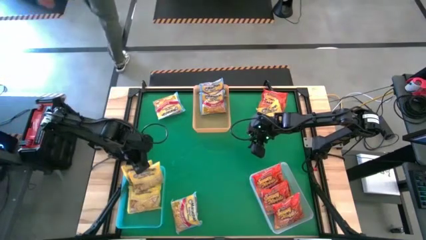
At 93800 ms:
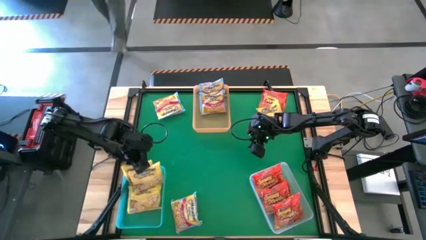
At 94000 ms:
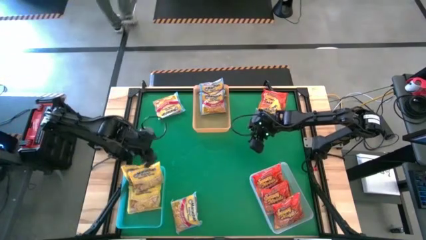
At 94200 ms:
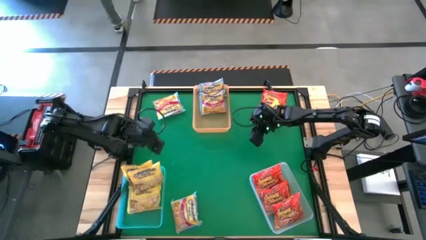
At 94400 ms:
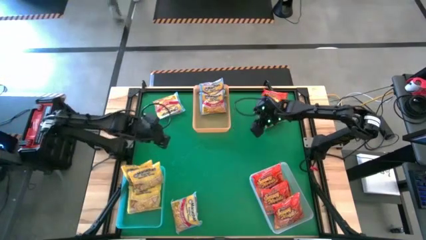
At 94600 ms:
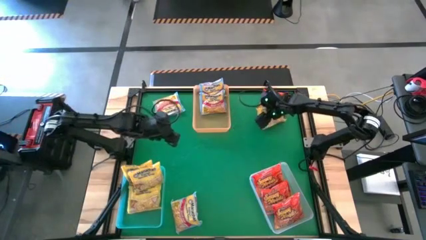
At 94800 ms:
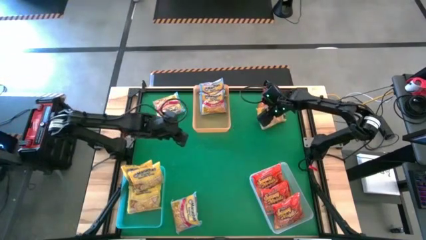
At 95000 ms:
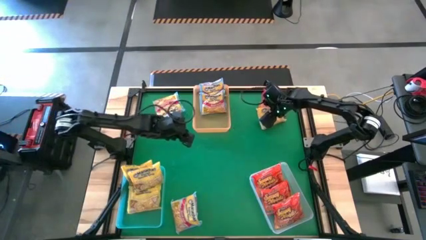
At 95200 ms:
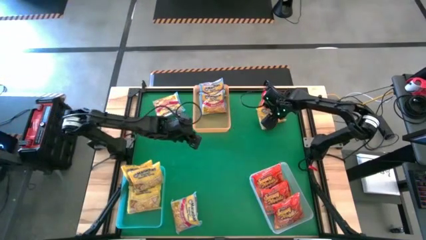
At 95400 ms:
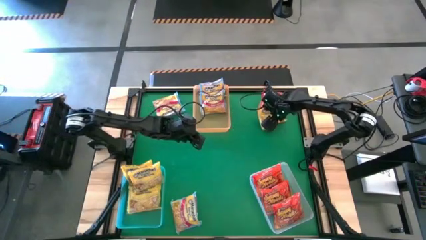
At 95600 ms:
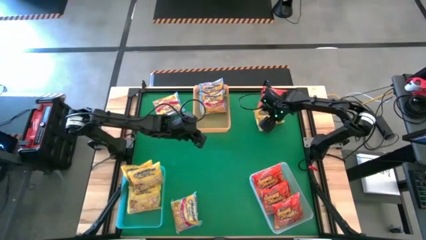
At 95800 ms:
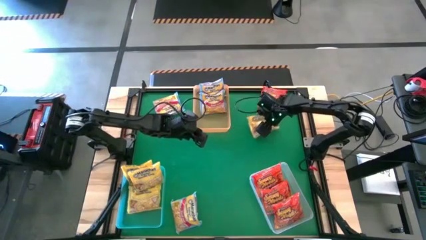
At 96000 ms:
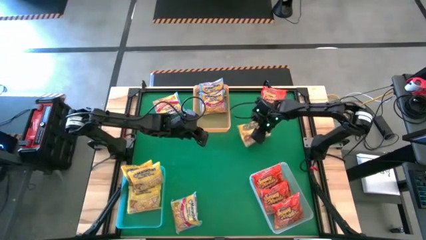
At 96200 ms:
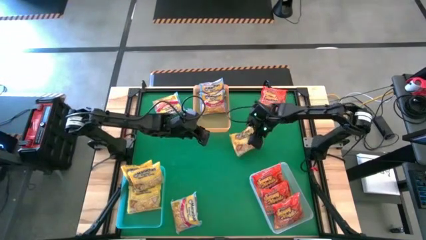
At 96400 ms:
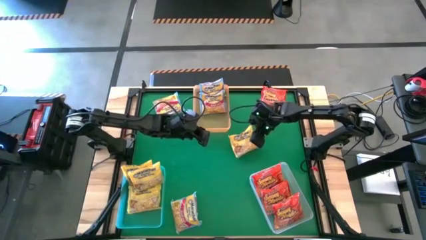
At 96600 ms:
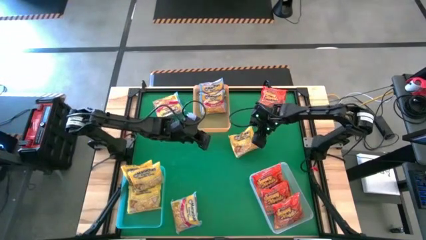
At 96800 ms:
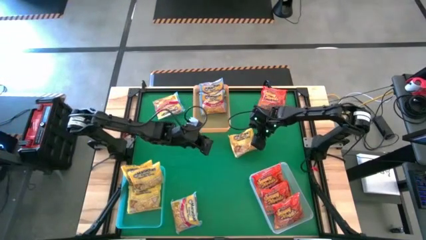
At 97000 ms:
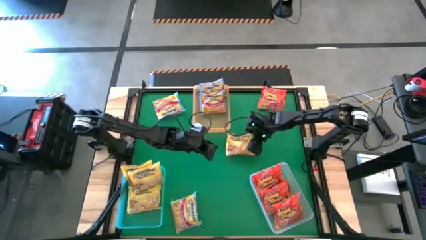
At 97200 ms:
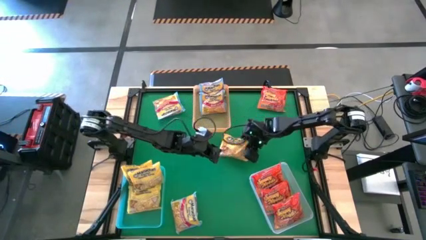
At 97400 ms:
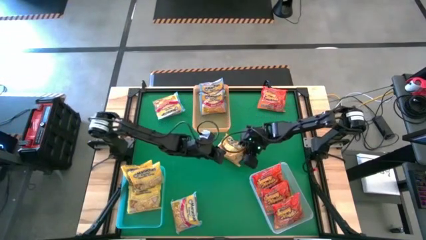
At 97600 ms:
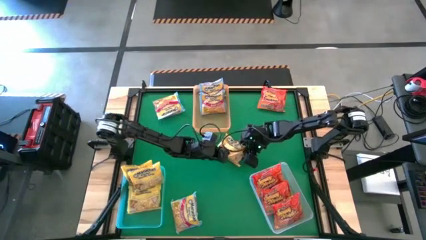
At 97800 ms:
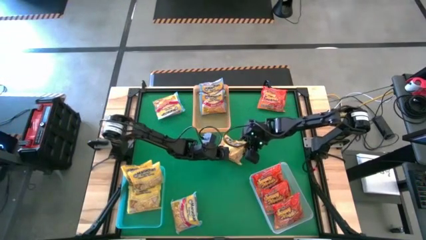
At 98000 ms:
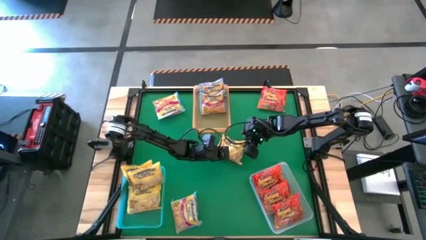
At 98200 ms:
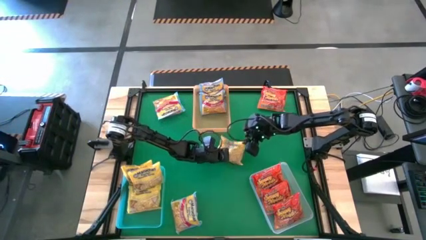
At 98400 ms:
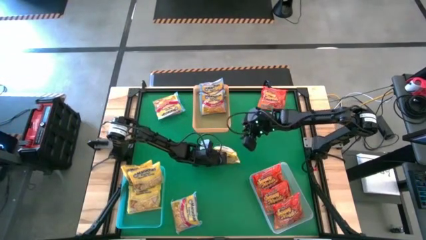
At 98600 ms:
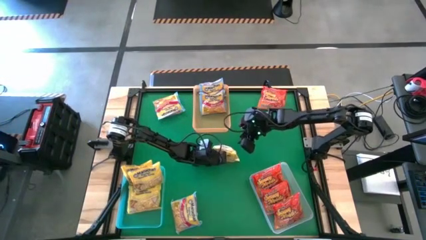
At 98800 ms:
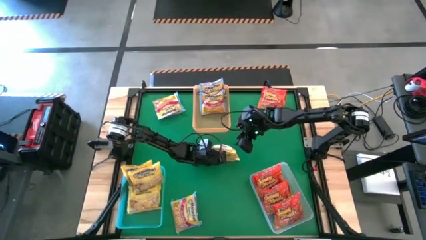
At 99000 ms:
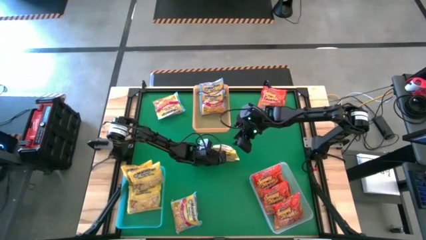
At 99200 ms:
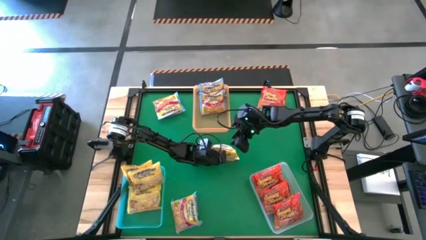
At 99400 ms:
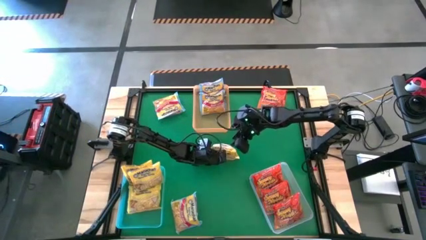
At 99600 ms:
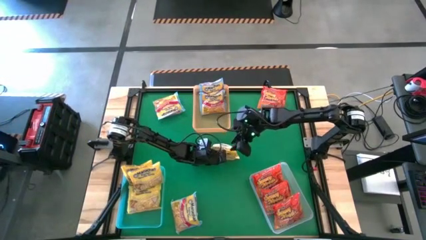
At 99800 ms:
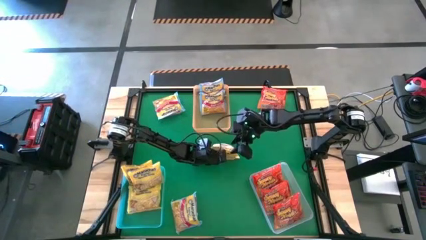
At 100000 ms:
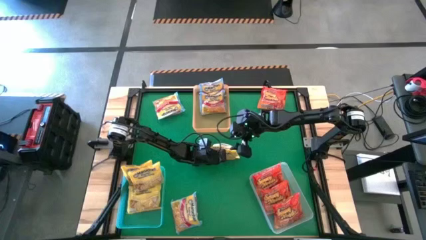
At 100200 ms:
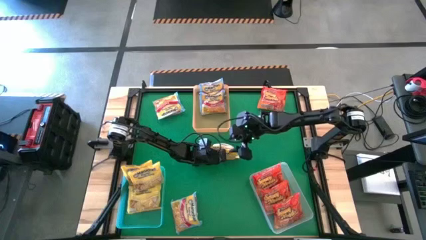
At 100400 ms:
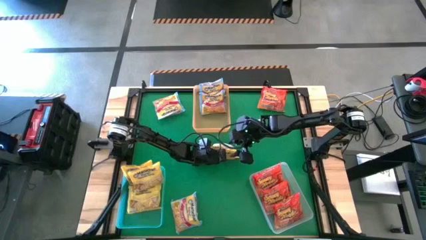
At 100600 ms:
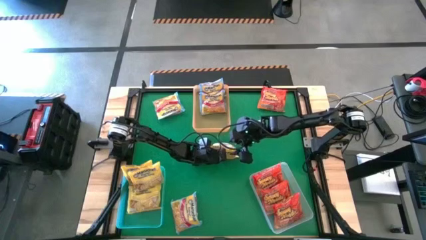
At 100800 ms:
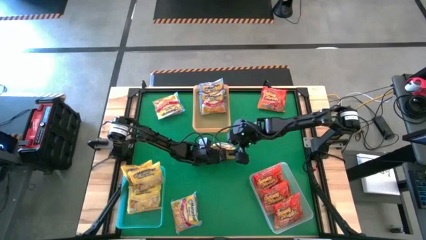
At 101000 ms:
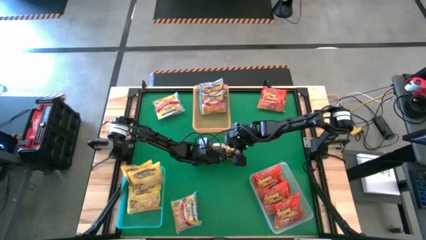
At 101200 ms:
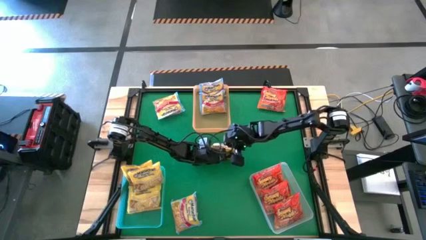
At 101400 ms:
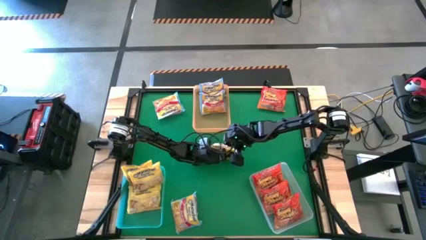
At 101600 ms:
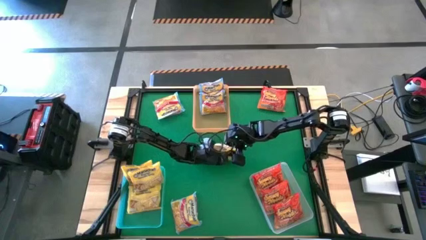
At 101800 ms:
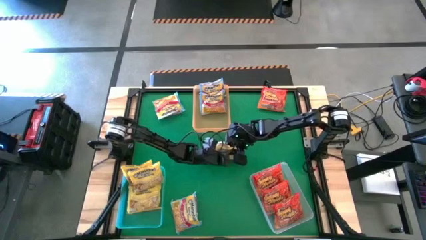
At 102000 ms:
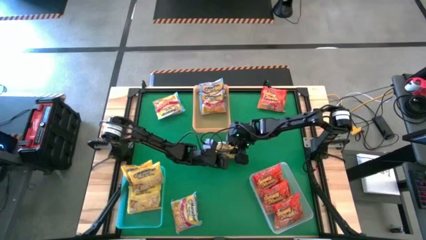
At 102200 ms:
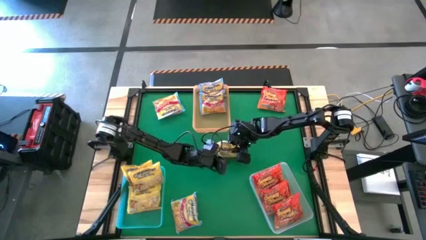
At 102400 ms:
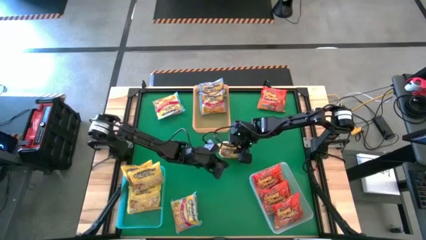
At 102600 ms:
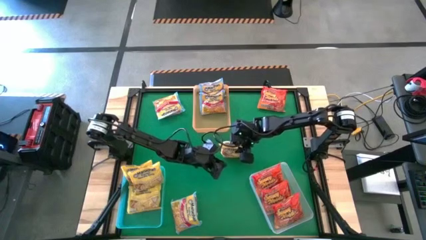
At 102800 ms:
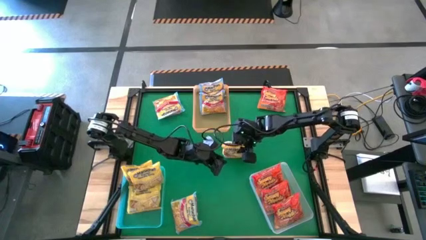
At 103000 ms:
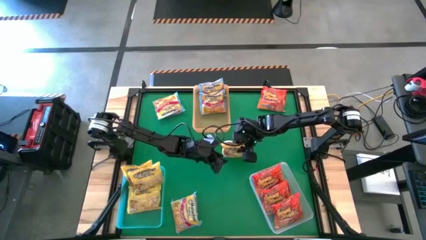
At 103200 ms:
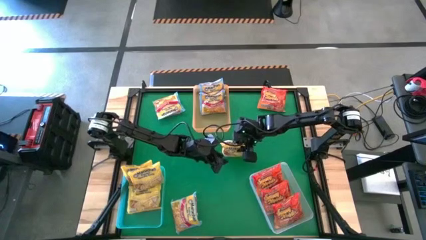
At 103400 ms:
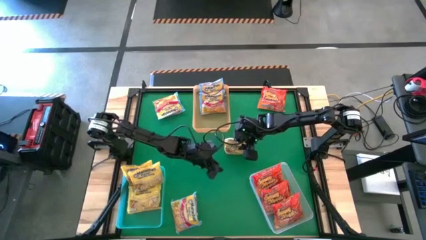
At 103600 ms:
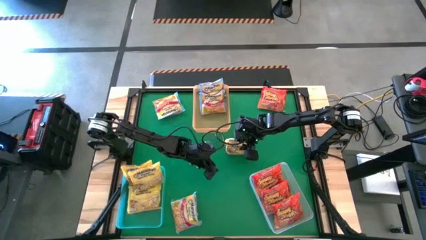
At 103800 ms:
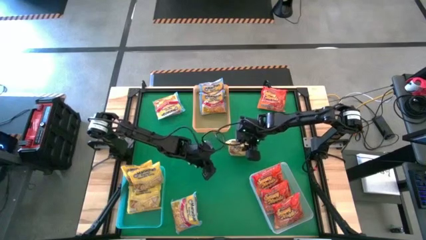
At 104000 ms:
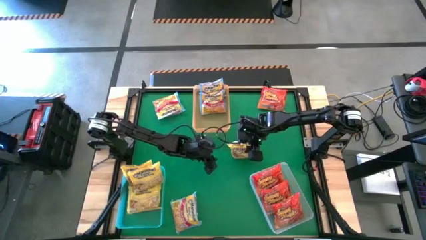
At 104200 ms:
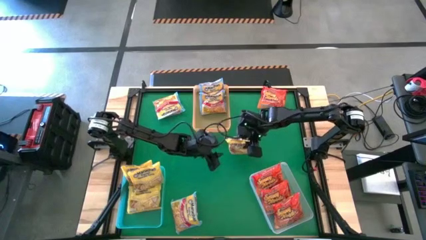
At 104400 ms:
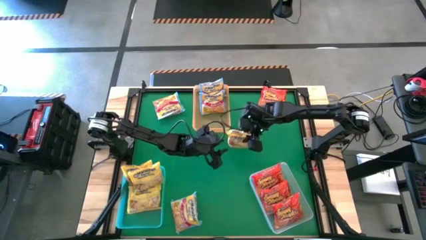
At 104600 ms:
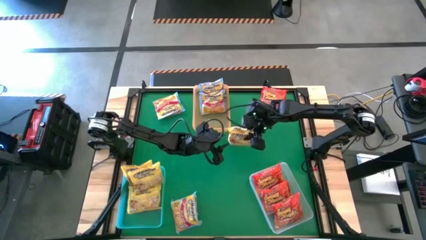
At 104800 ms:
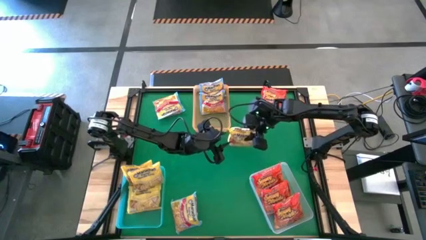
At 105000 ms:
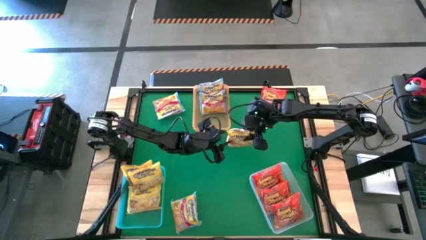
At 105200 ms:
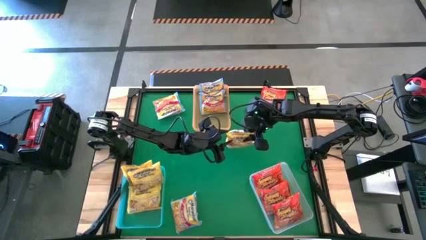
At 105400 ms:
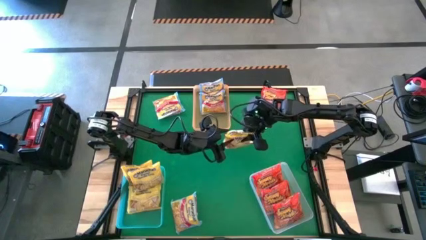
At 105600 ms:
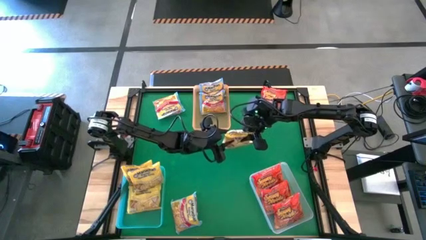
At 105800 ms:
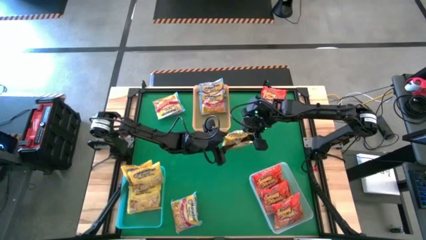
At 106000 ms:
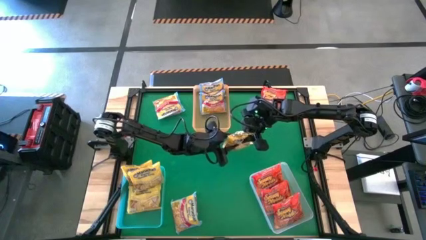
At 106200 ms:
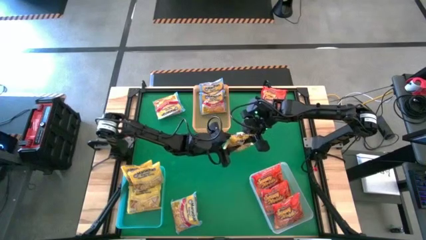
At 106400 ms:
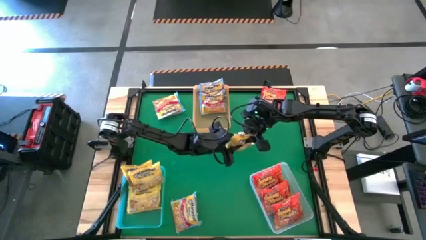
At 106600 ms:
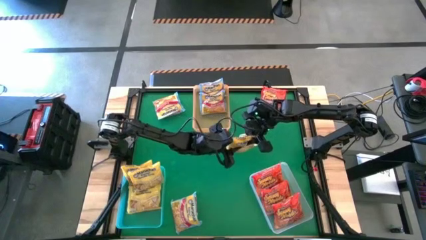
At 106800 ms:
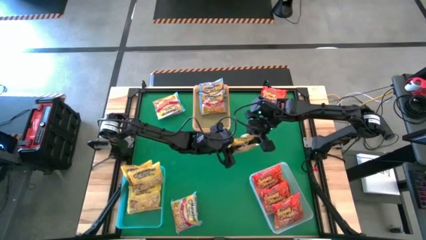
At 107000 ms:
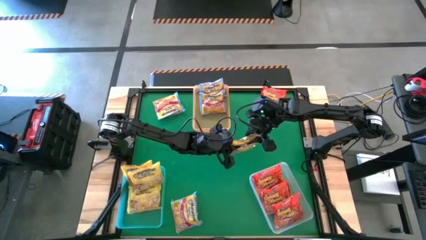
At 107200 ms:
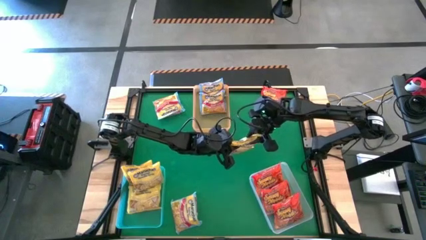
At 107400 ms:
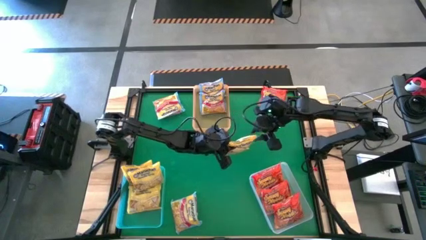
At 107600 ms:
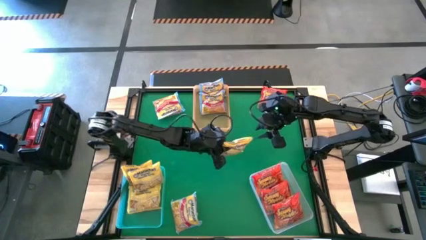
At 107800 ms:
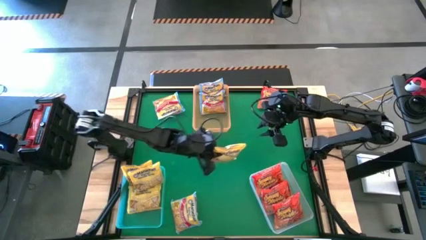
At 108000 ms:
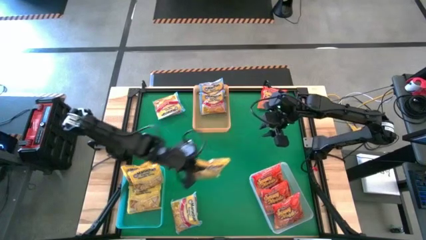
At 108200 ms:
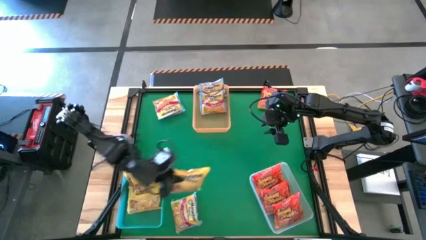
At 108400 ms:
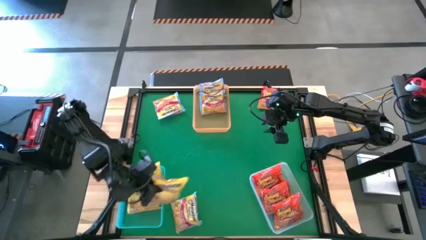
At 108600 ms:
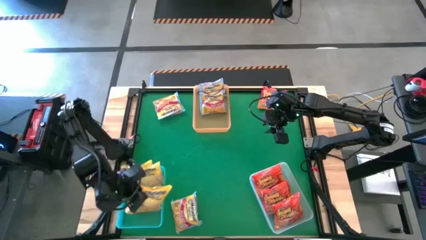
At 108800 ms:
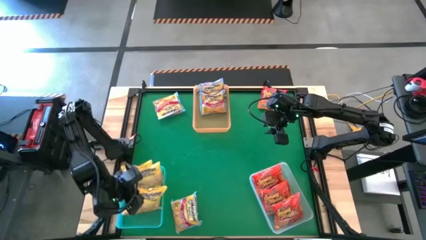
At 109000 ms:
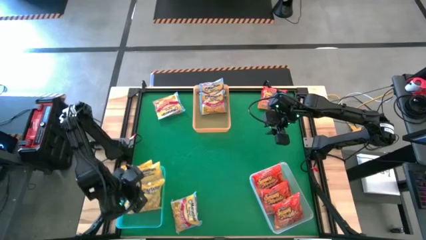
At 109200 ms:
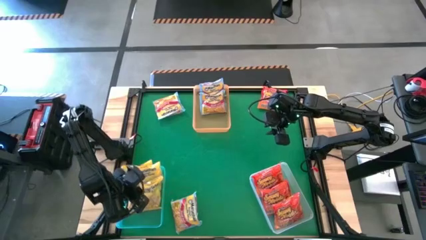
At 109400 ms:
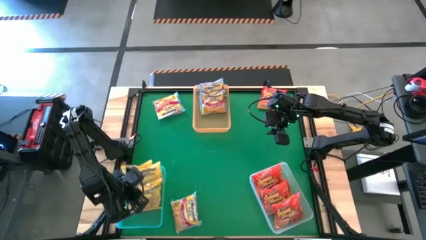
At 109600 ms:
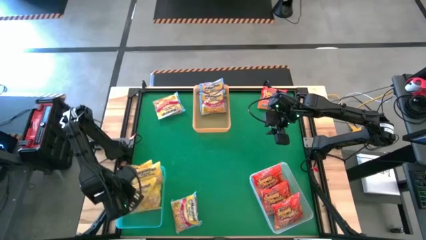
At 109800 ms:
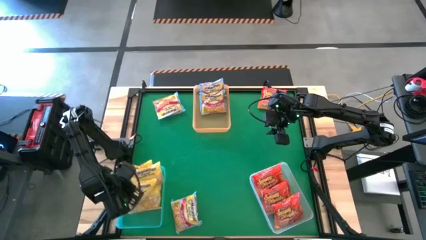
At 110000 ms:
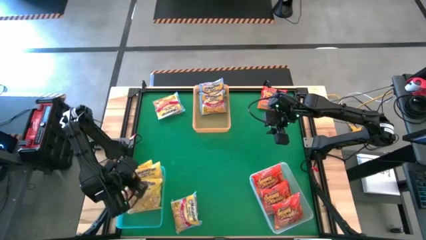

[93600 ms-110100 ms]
Task: Sort Maruchan noodles
Put the yellow noodle pack into the blue bin
